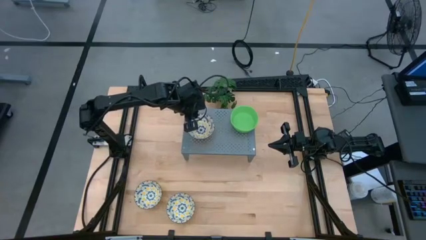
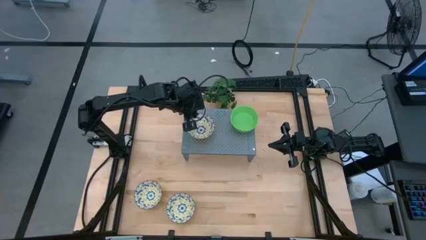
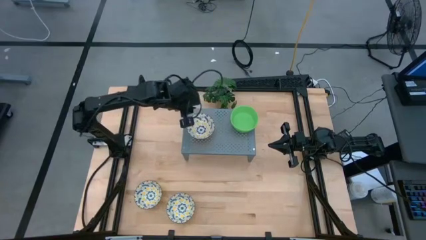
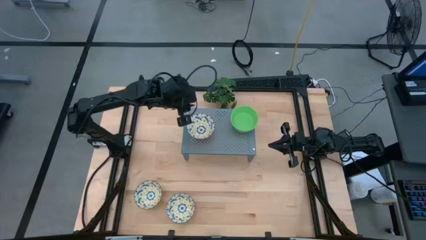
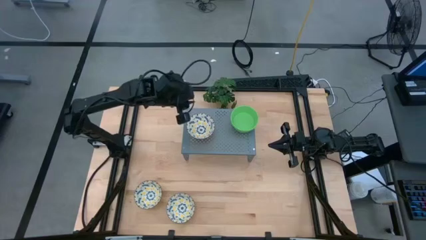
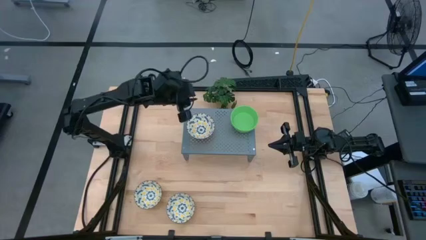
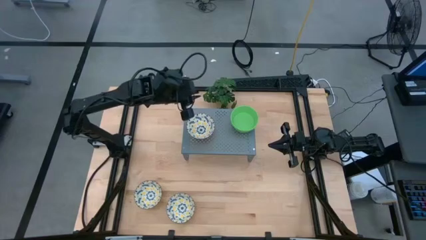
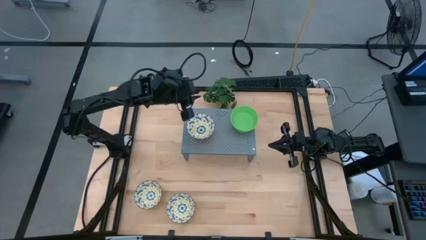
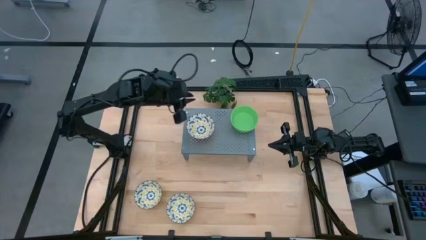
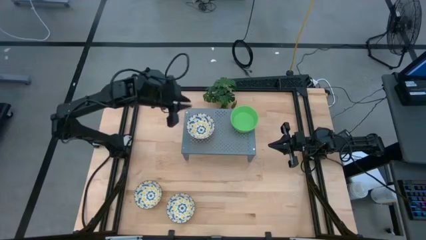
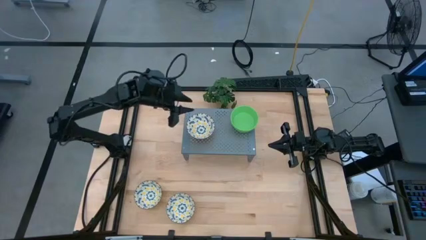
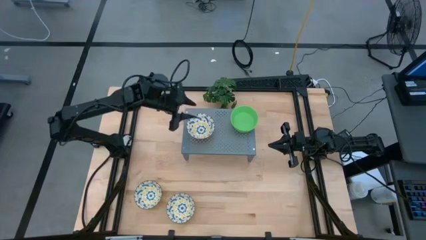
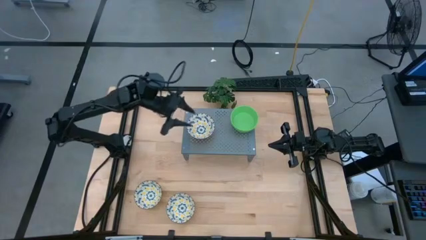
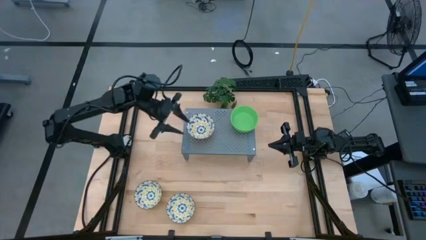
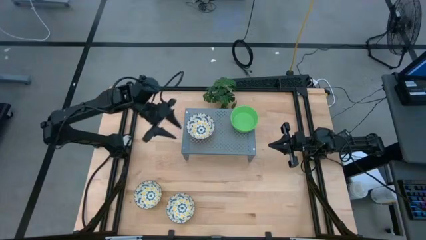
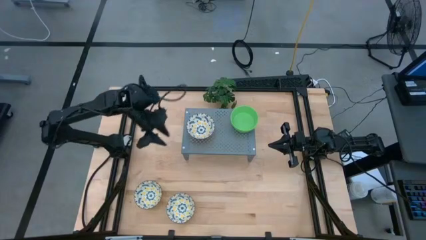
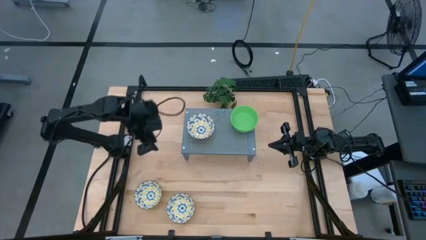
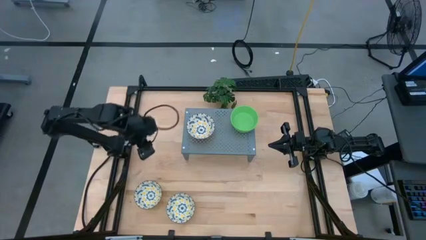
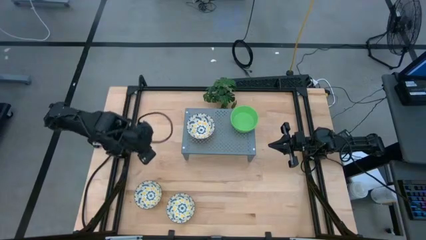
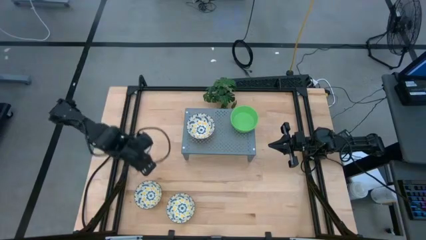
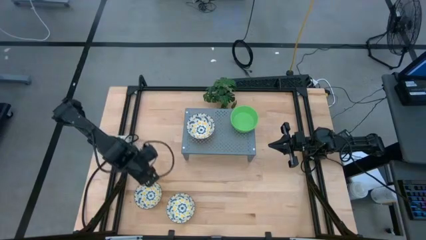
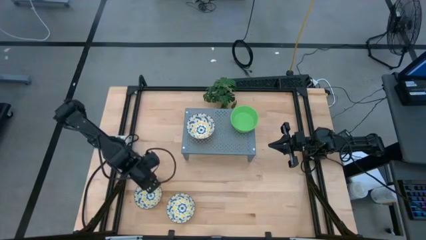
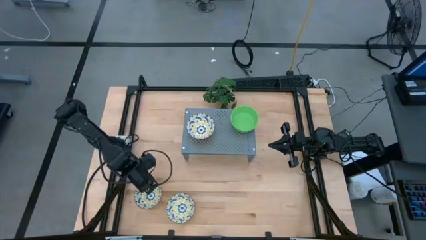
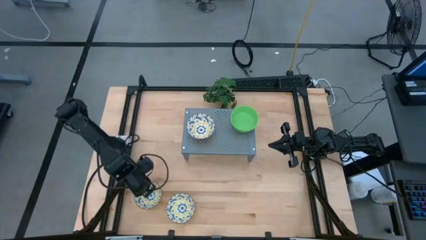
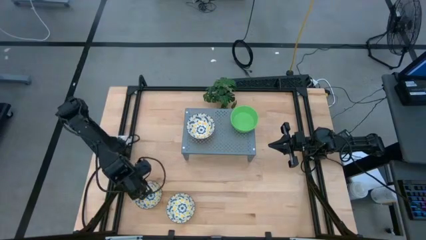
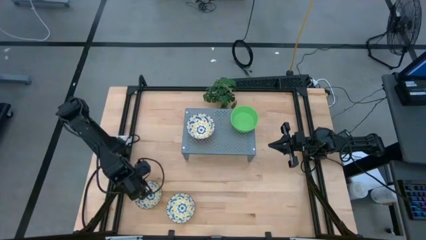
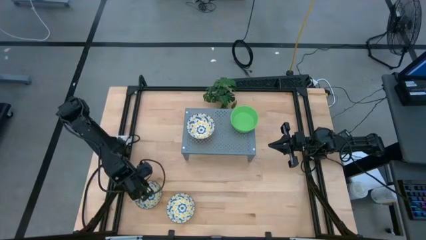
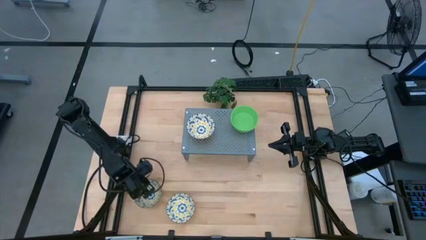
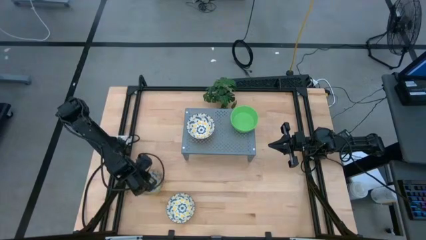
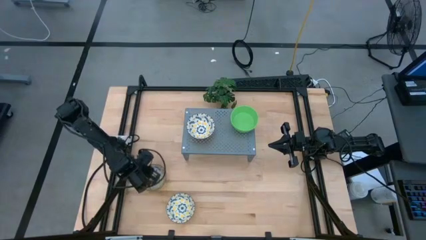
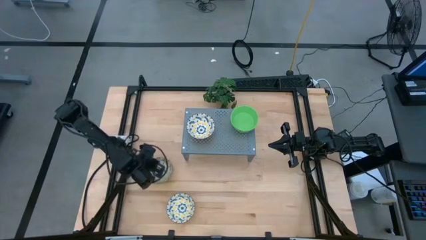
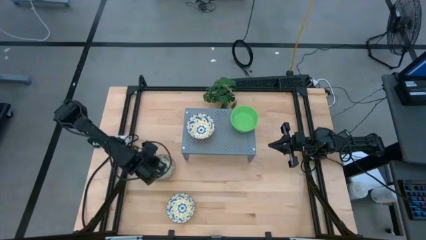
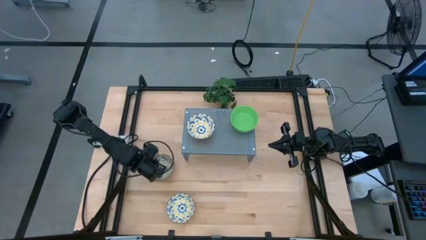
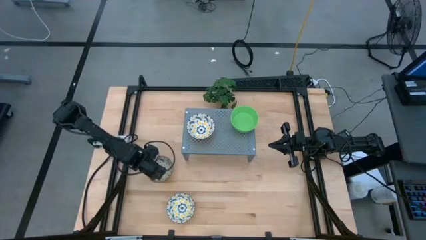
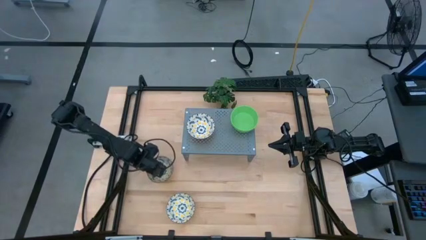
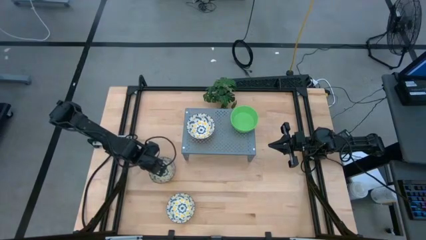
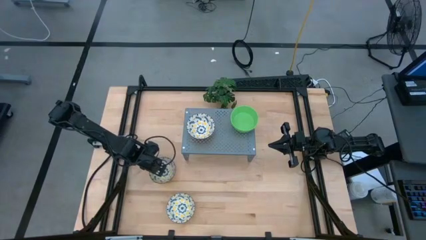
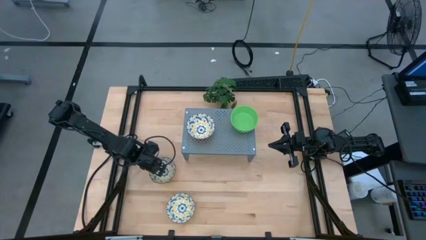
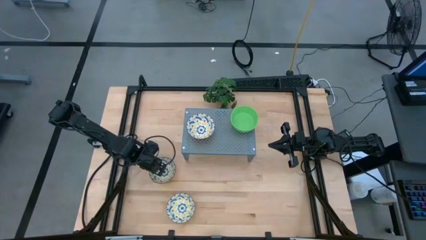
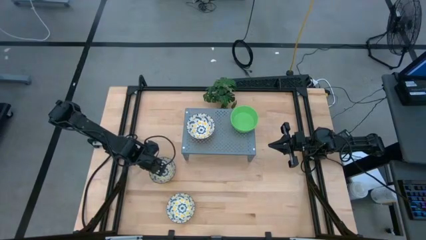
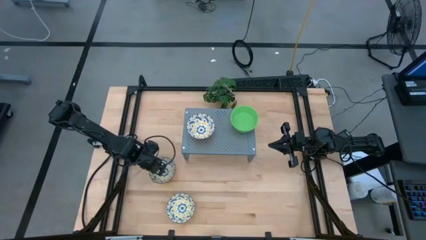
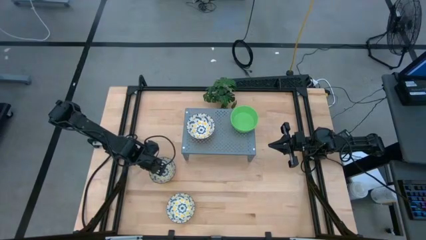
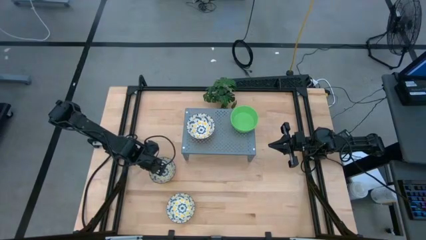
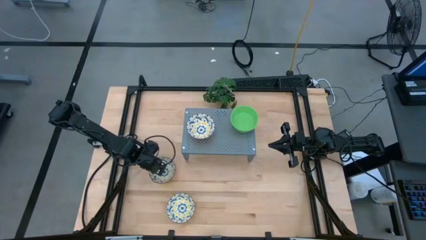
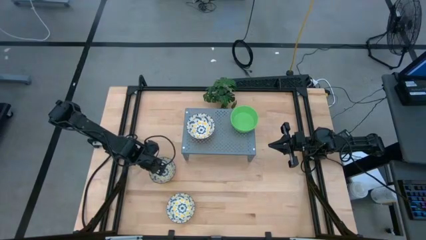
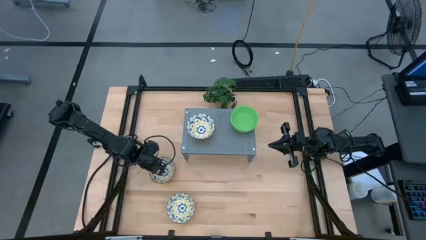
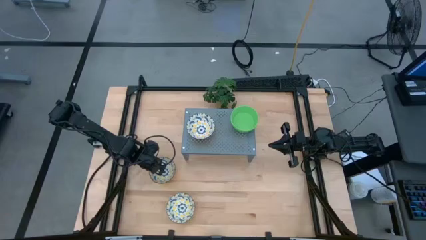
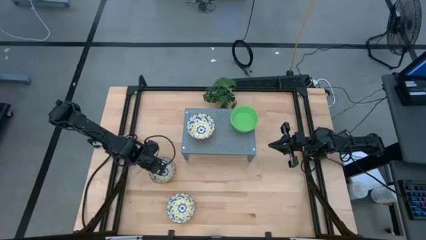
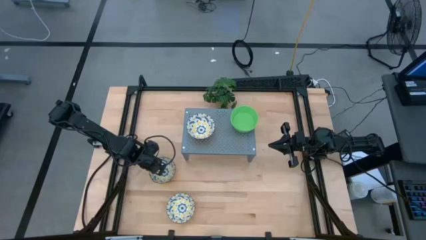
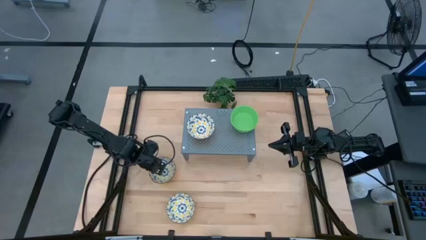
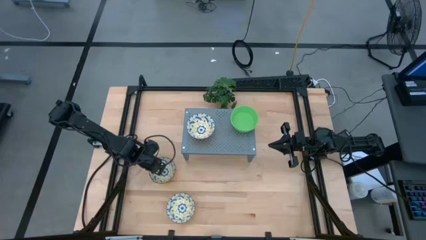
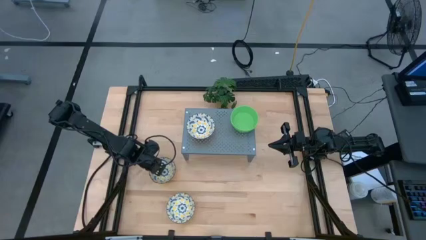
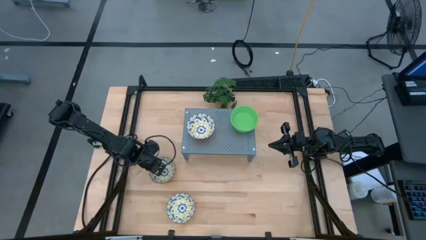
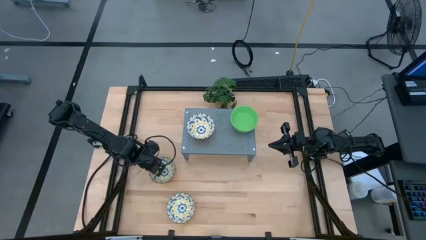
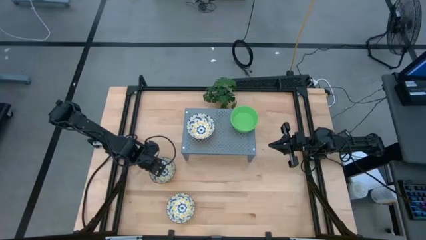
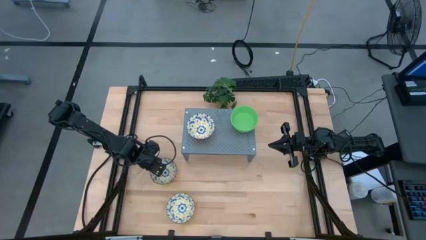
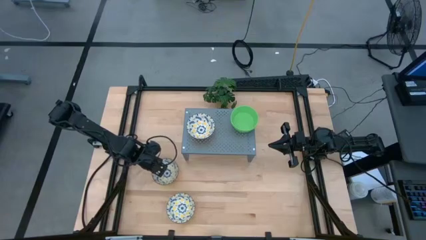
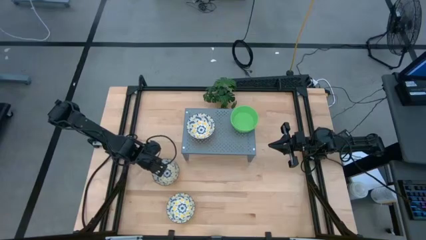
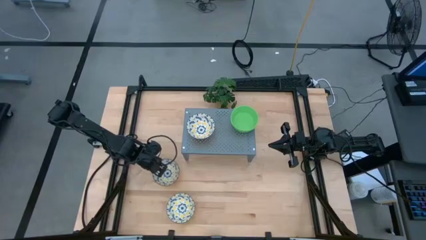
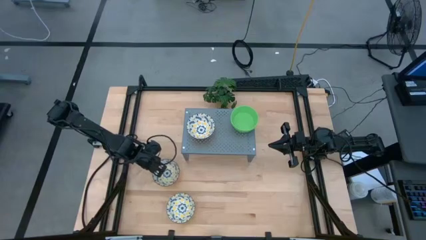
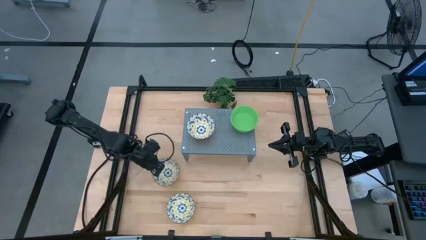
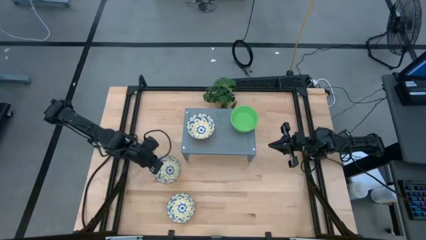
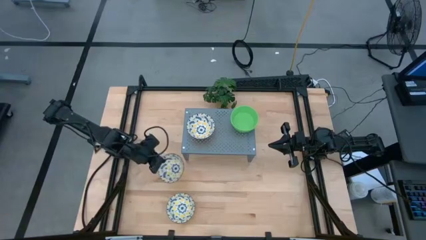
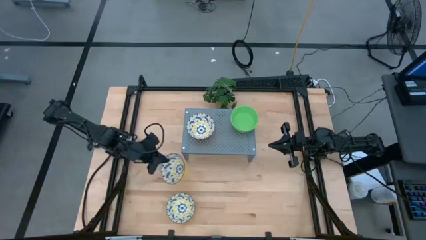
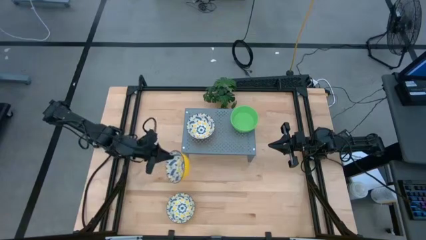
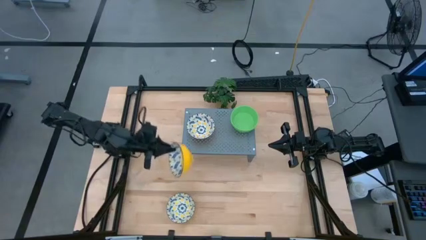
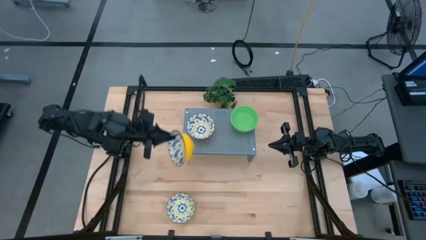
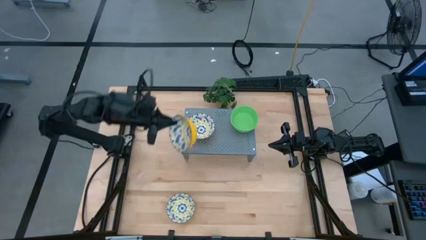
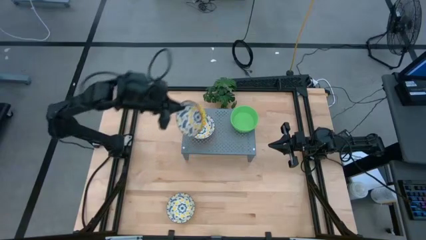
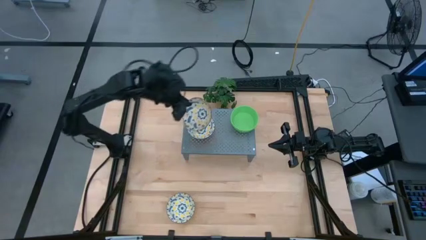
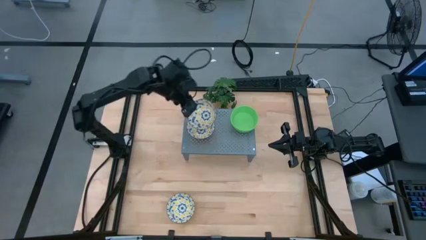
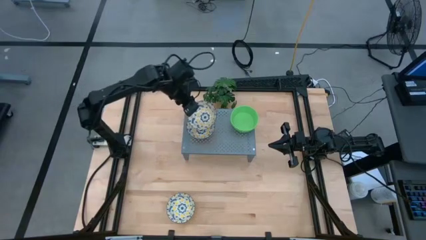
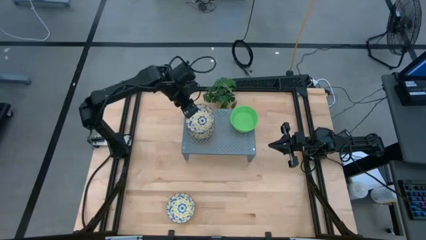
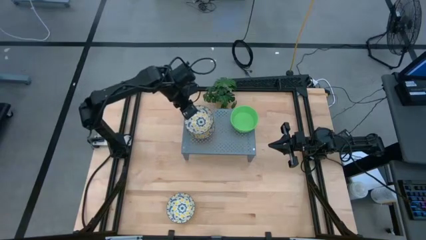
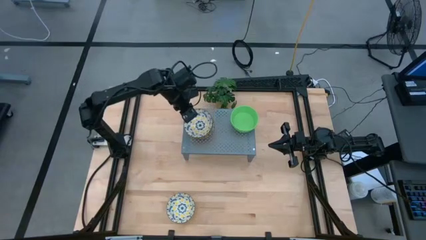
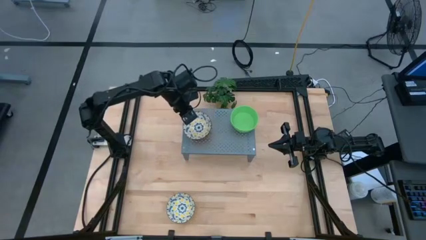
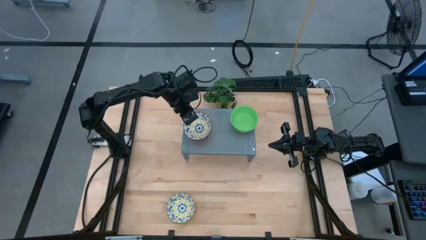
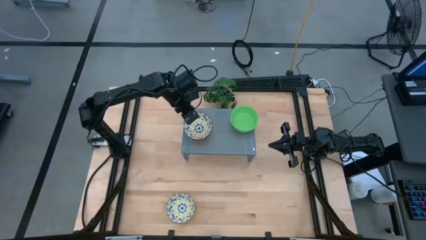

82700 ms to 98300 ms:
Task: Pick & Place Mini bowls
Stack the left yellow bowl on the yellow bowl on the shelf

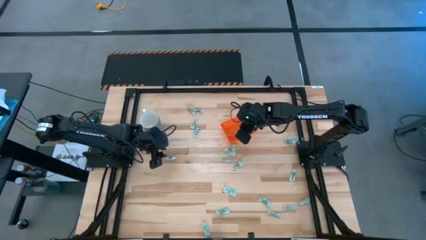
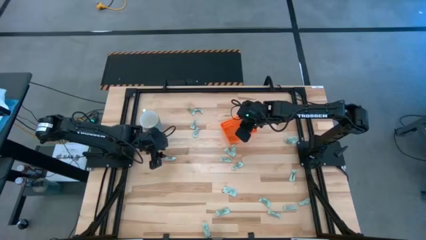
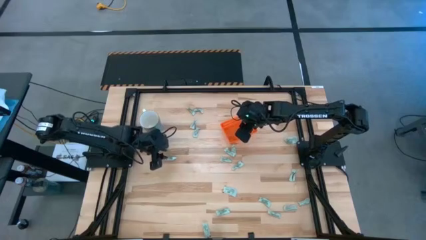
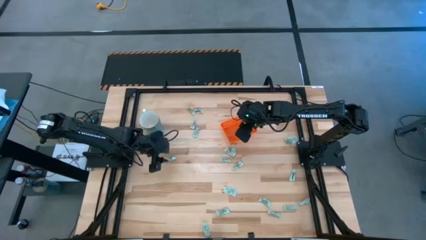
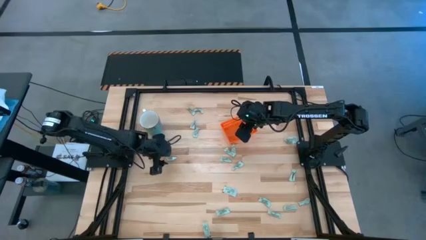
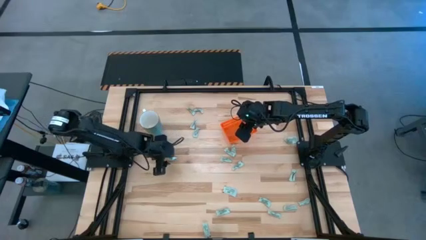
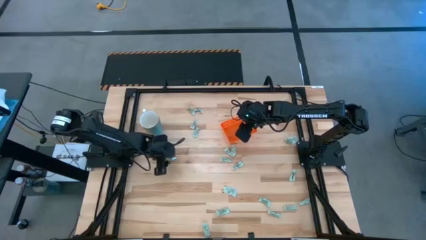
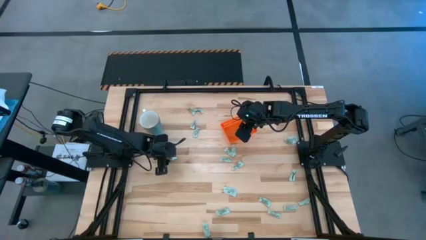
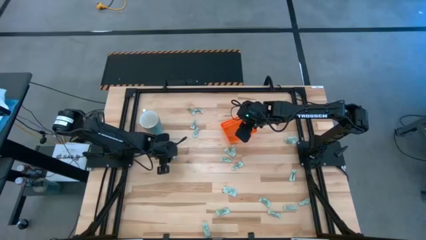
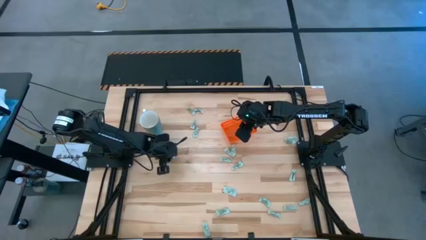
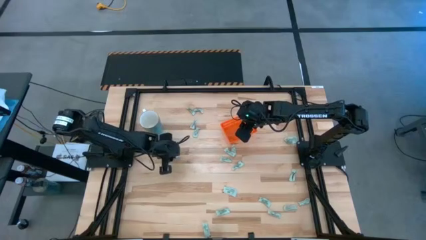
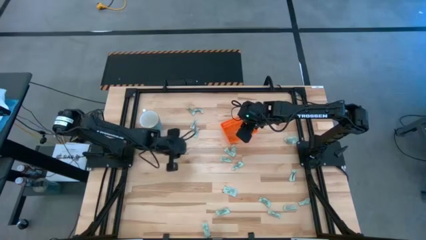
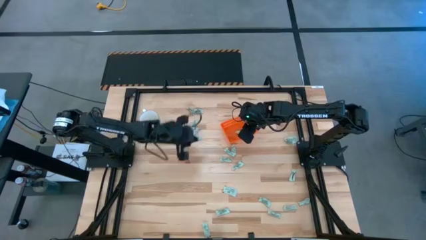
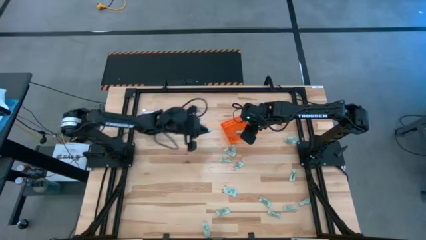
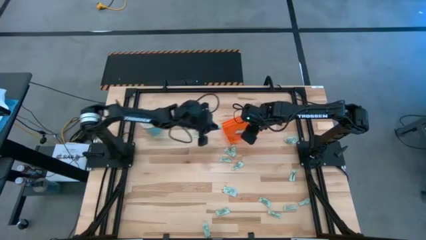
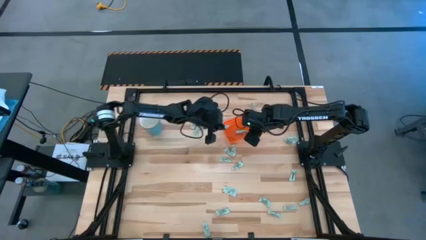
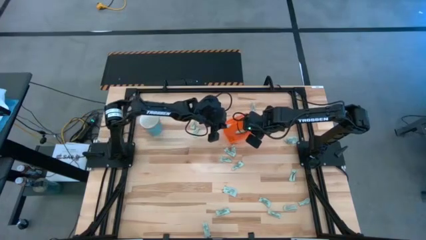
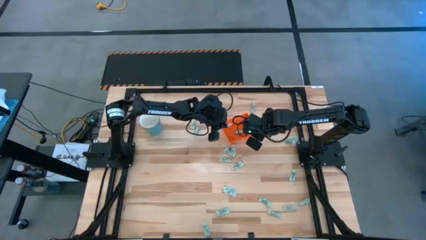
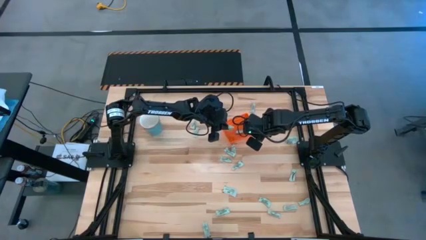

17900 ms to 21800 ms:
Task: Pick and place Stevia / Truvia into bins
Put the stevia packet into the bin
